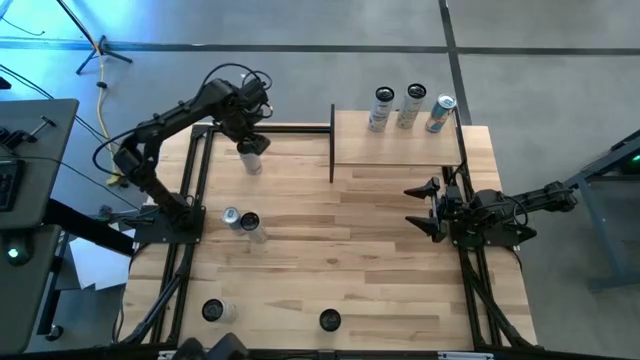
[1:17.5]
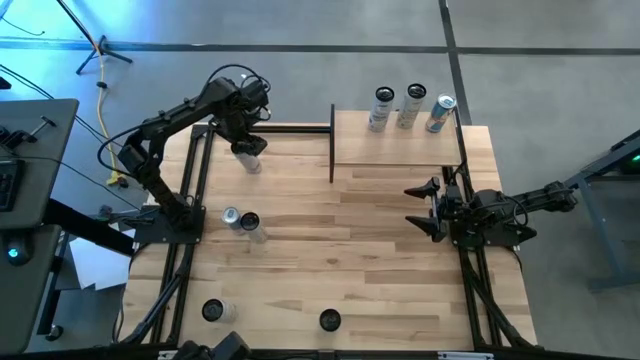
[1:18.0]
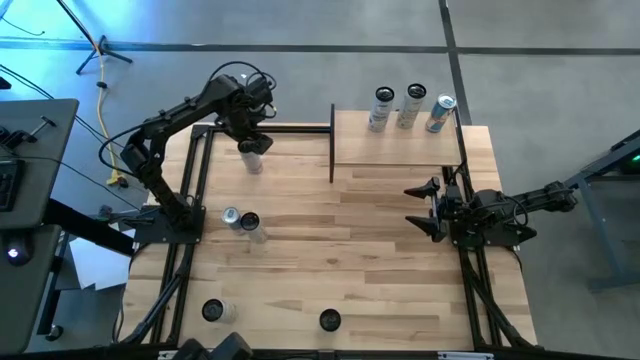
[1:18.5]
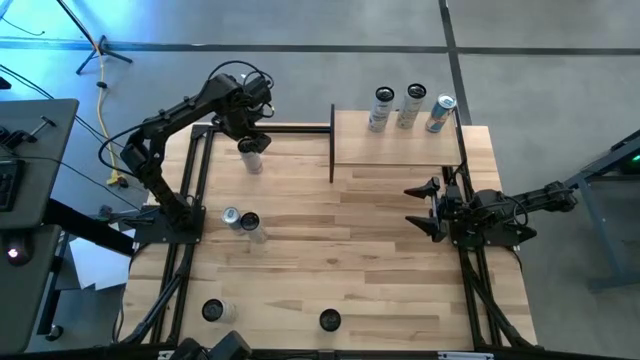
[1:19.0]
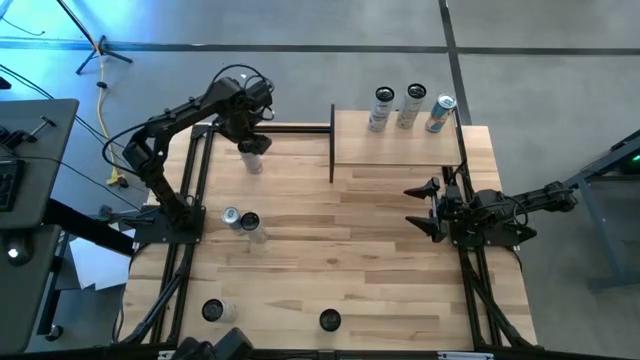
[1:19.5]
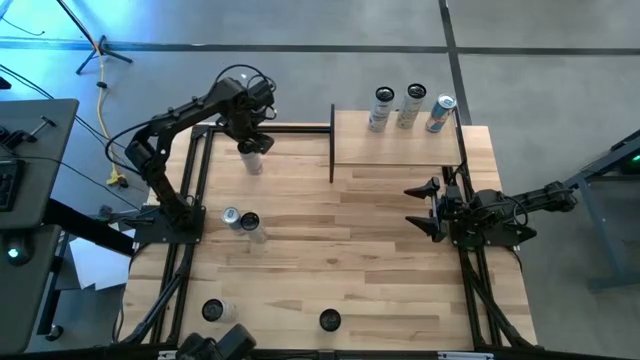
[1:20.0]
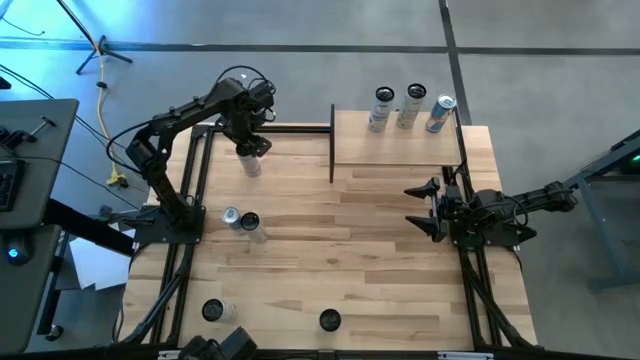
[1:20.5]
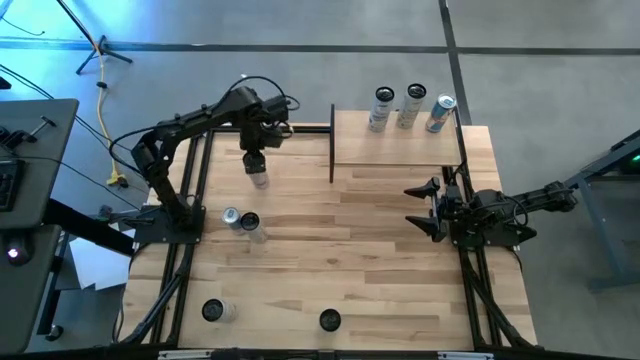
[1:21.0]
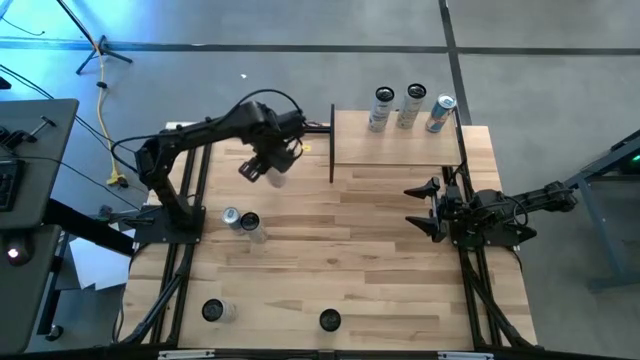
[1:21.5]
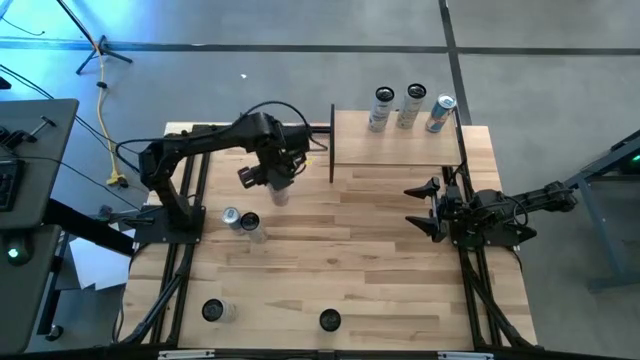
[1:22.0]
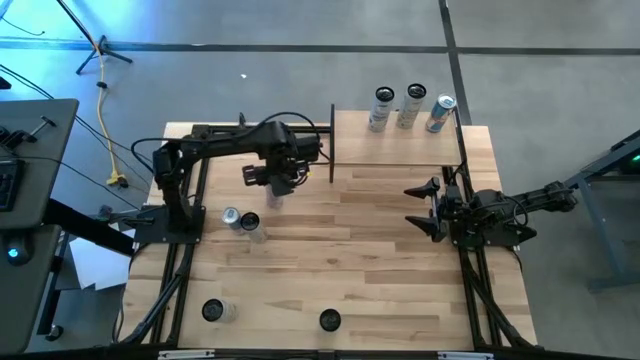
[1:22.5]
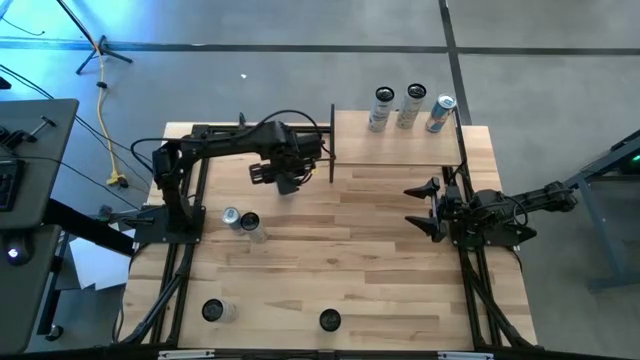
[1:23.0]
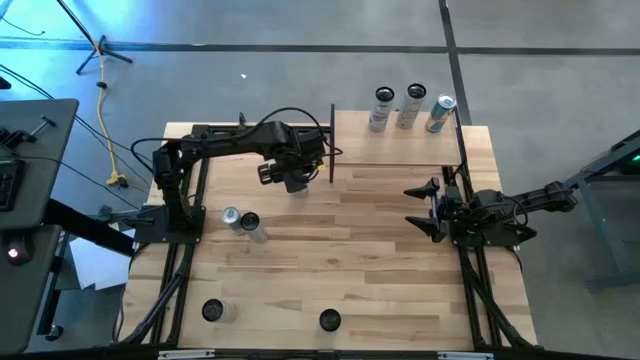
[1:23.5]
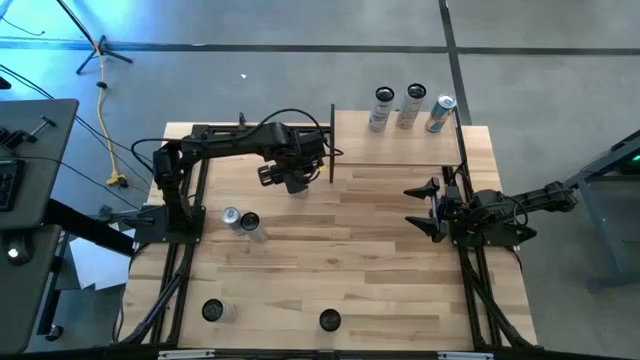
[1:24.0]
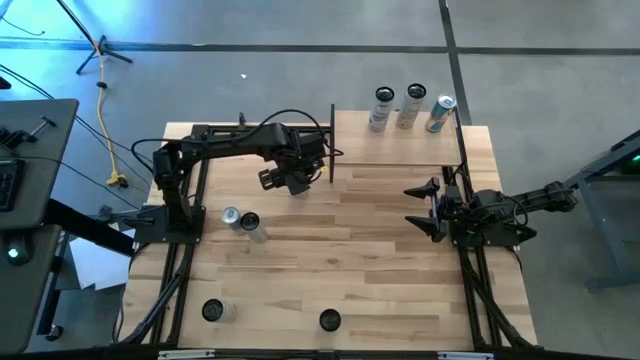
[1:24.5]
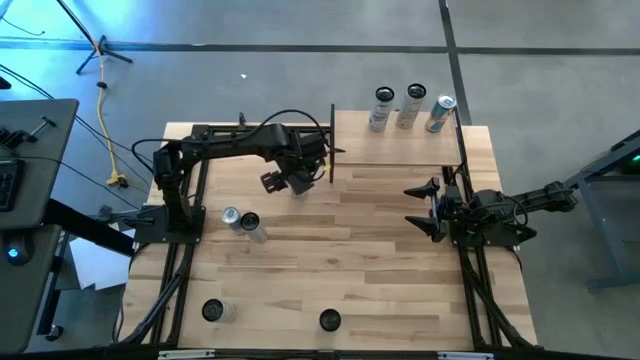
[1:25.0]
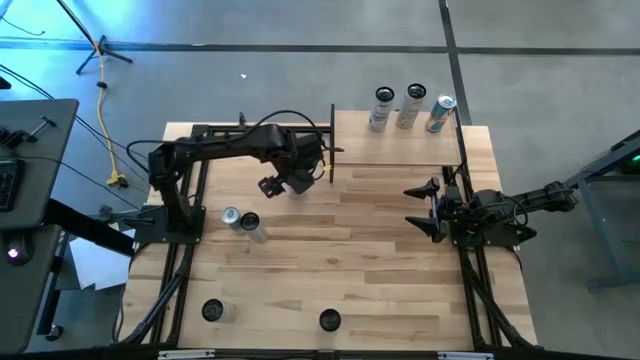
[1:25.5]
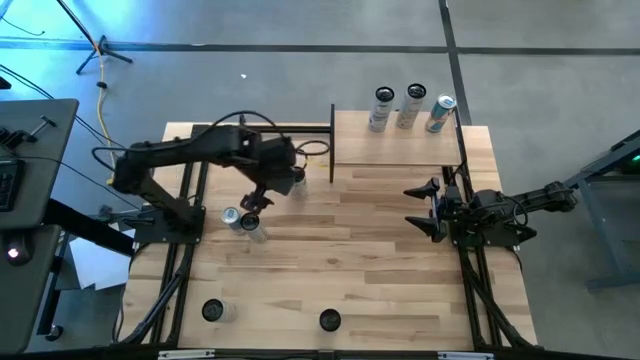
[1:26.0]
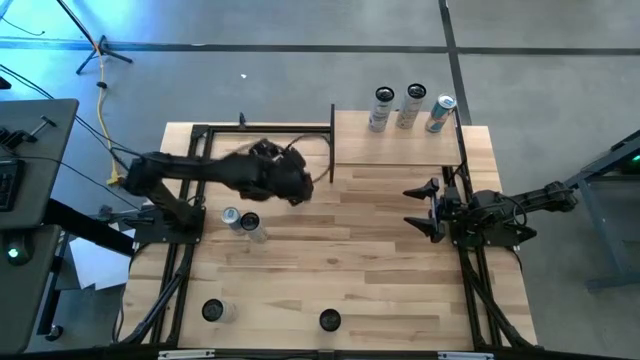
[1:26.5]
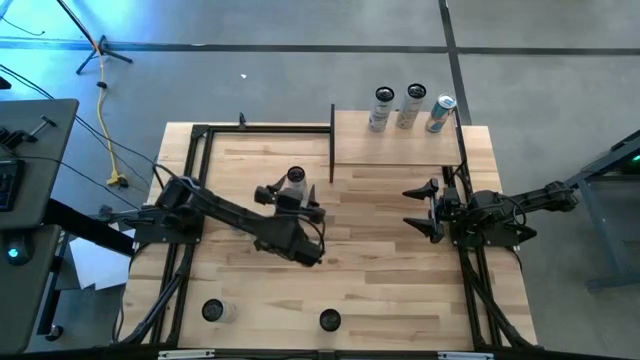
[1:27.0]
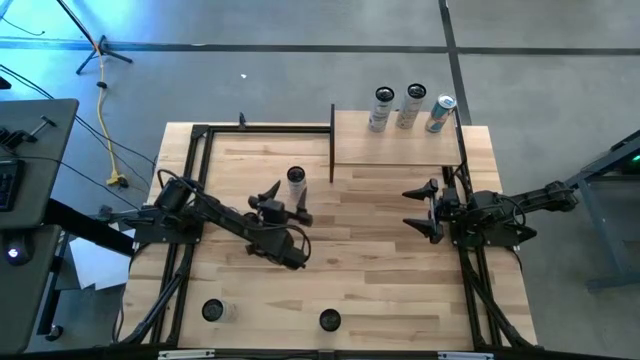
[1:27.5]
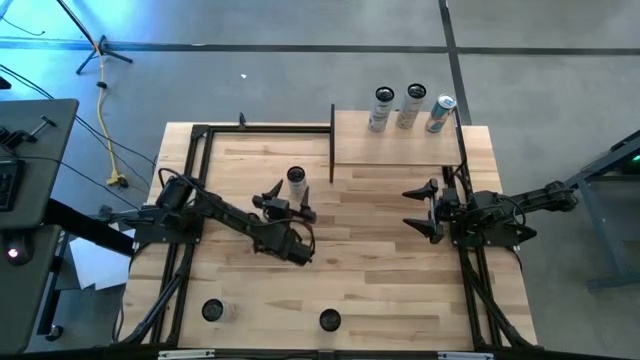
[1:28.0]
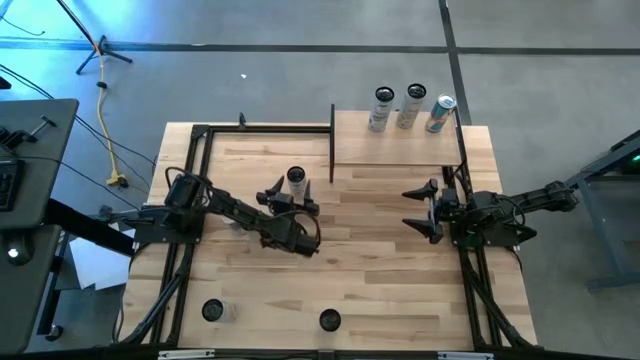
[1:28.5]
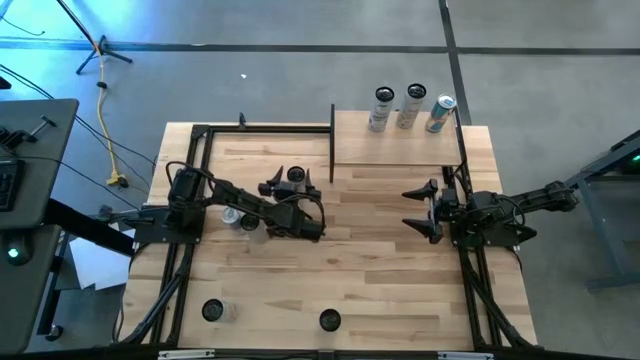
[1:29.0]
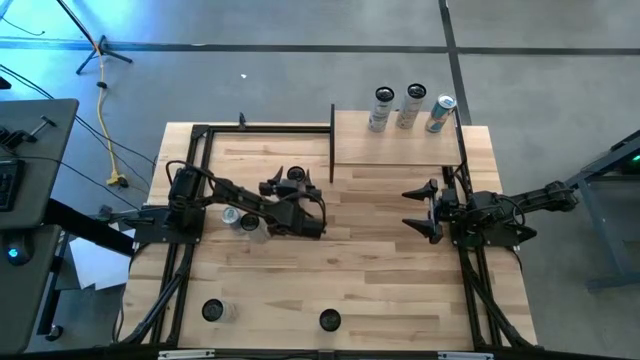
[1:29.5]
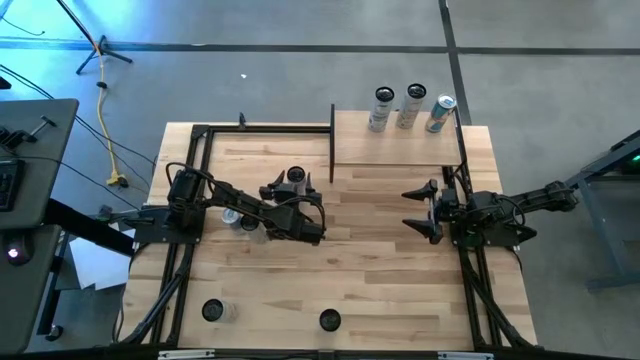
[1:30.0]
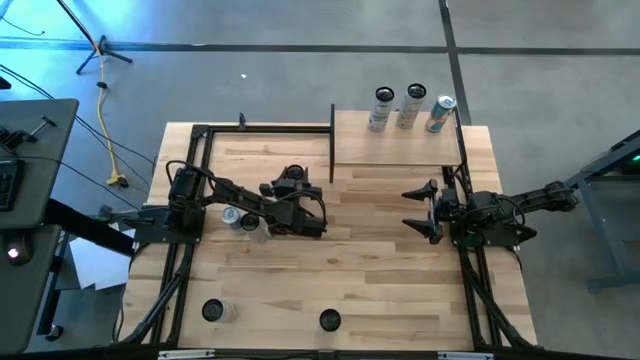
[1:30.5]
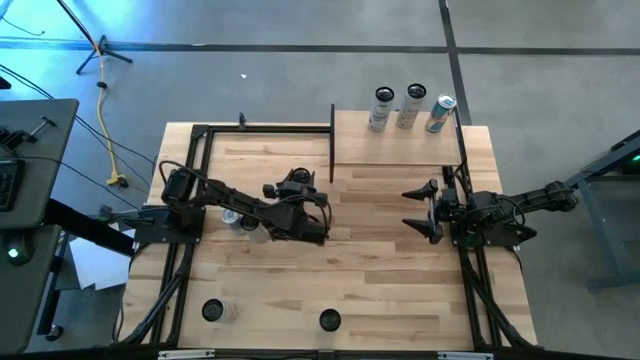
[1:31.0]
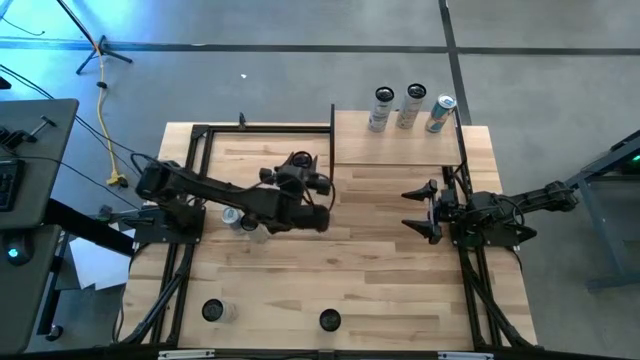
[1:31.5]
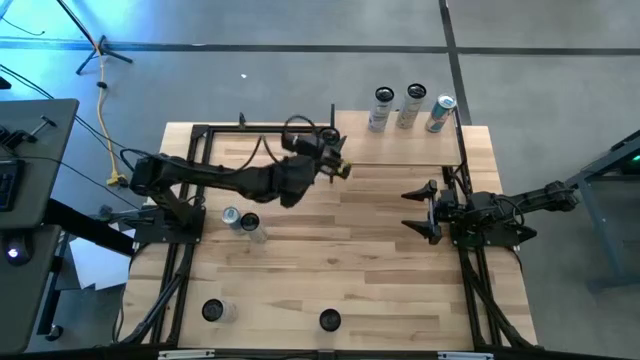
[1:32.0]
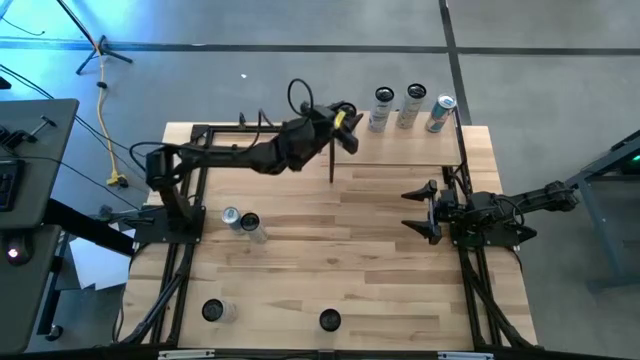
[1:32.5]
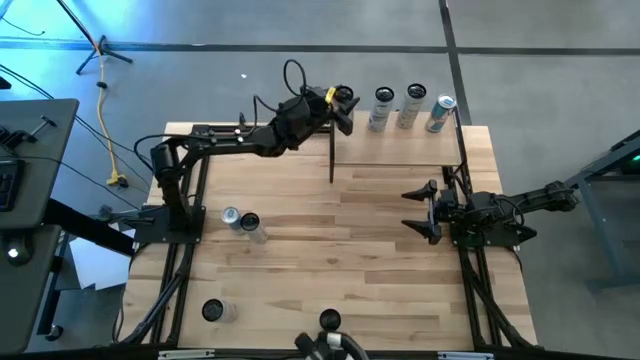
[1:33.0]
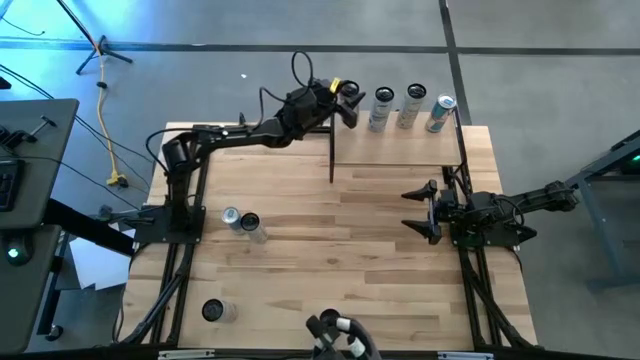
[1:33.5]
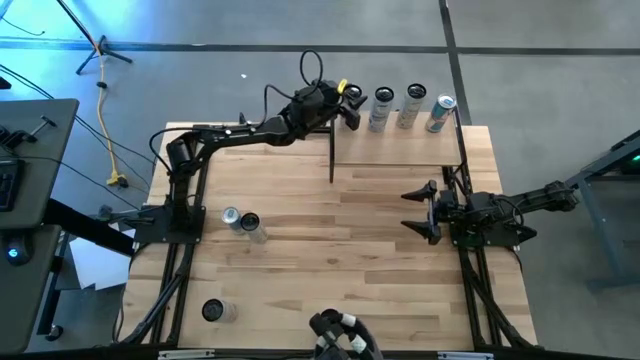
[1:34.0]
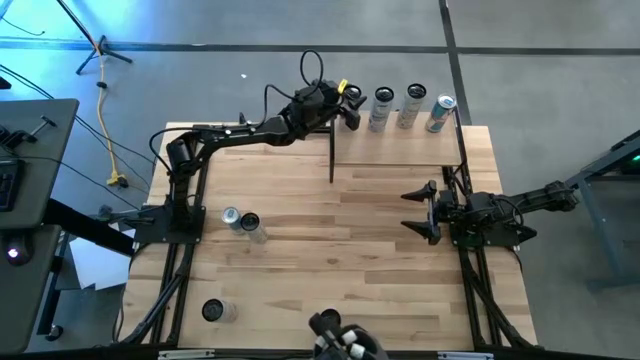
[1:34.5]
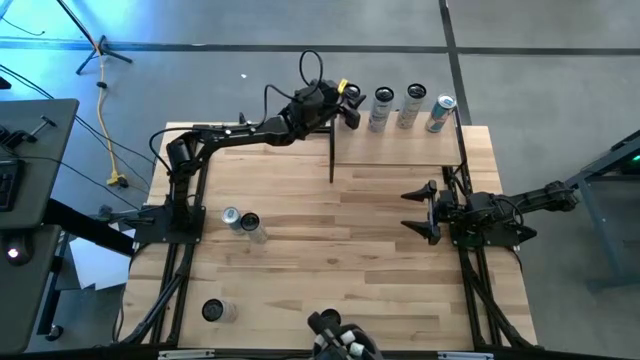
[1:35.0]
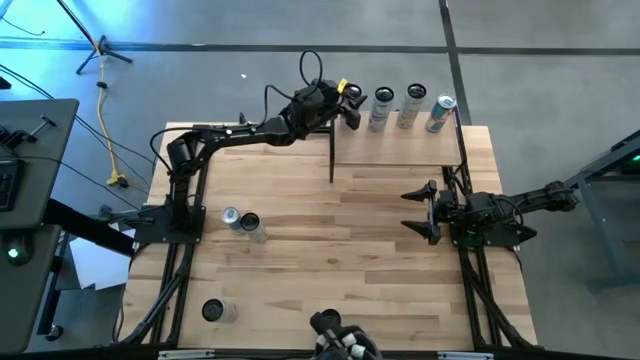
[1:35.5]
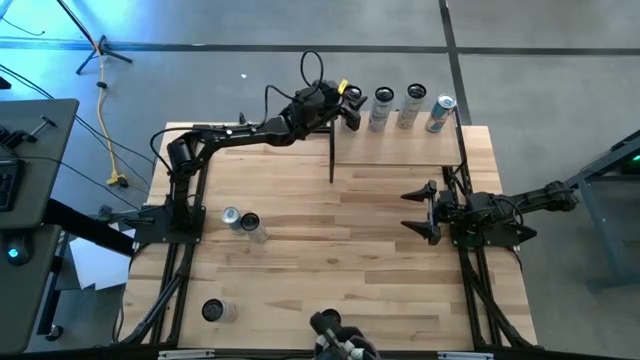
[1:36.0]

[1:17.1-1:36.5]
Task: Place canned beverage on shelf
Put the top white pink soda can on the shelf

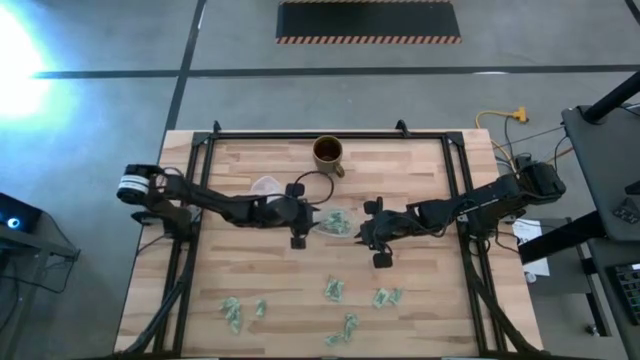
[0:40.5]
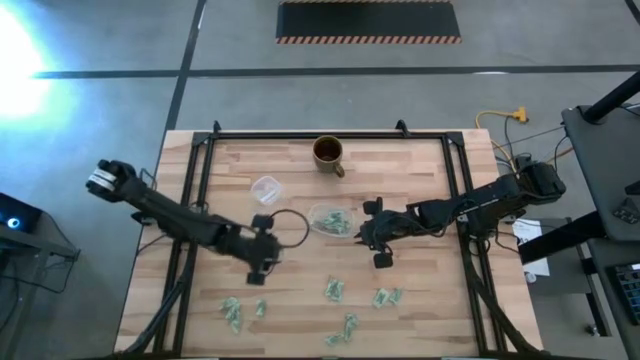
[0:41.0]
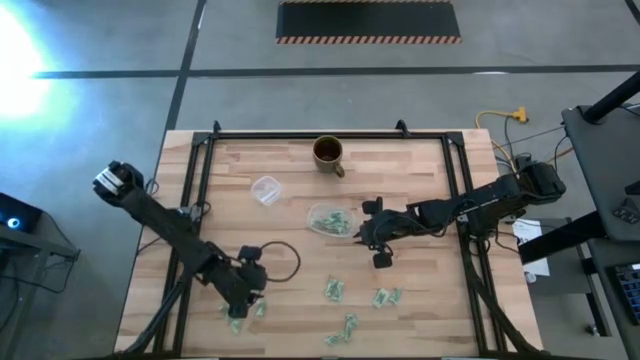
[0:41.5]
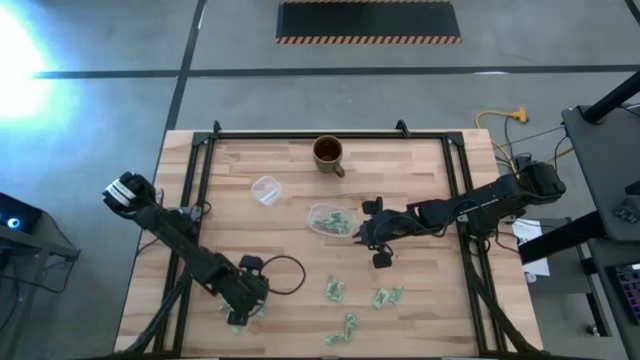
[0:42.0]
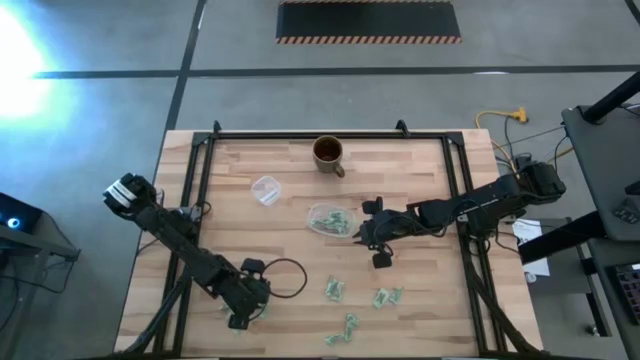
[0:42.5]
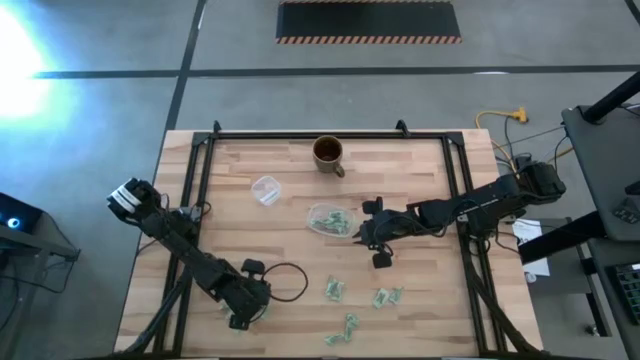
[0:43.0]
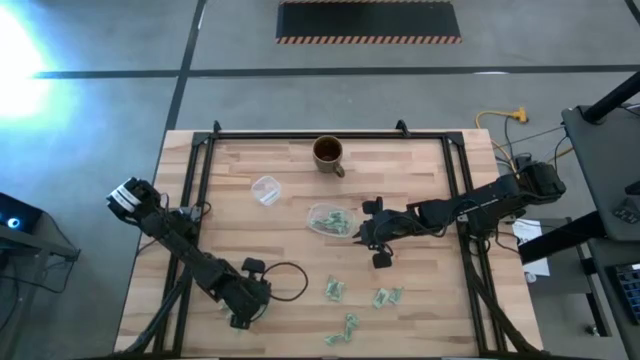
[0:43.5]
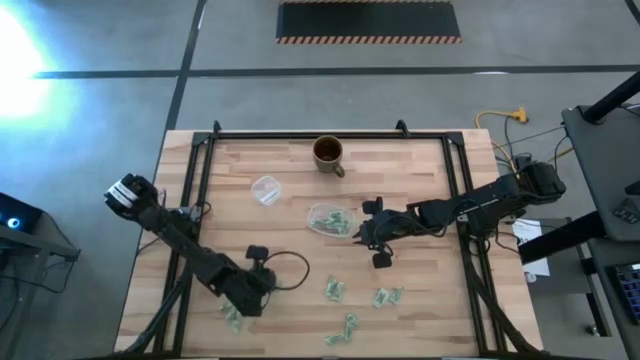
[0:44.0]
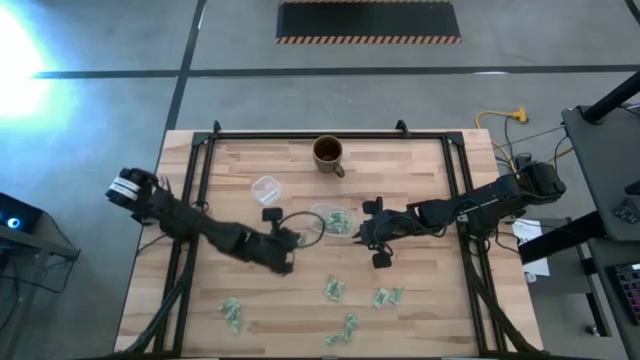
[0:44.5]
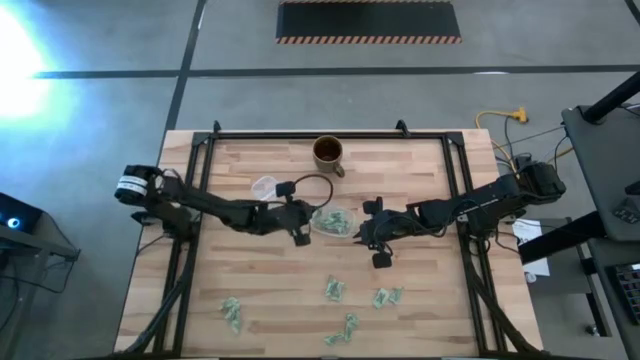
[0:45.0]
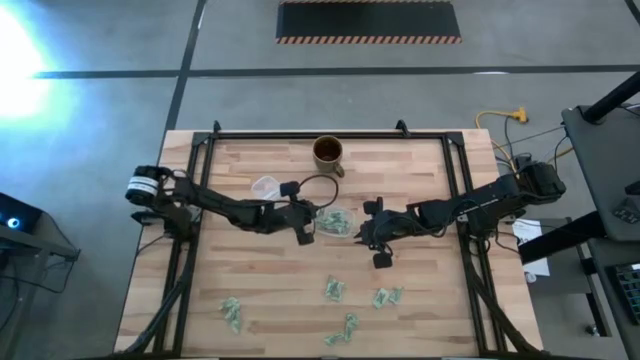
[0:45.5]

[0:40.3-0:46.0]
Task: Pick and place Stevia / Truvia into bins
Put the green stevia packet into the transparent container
